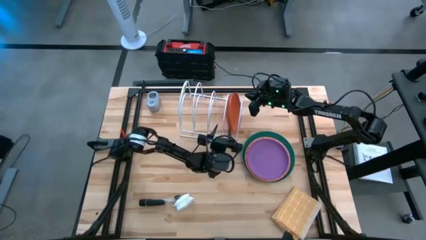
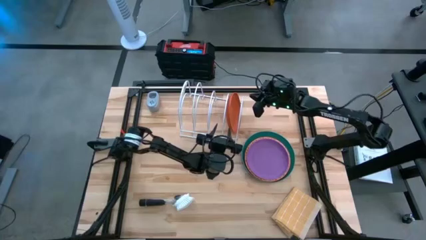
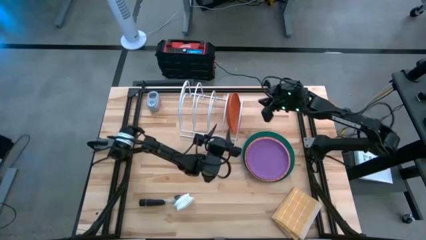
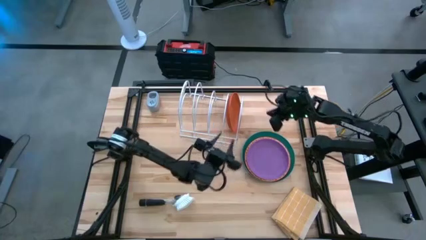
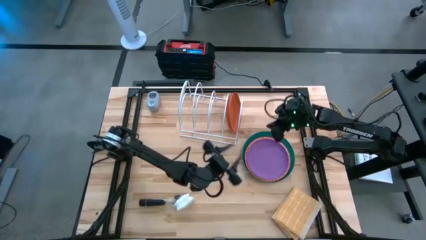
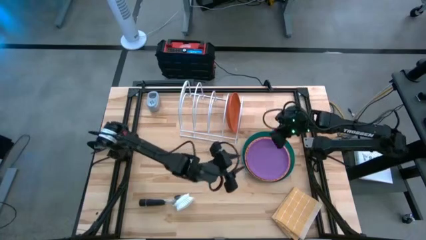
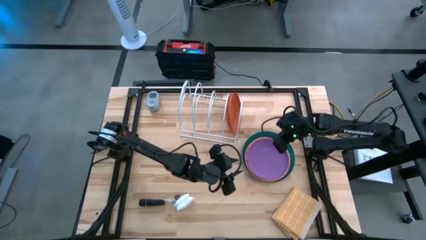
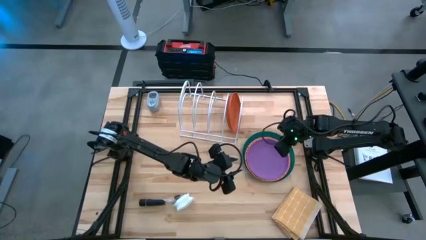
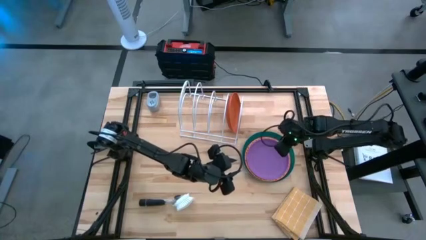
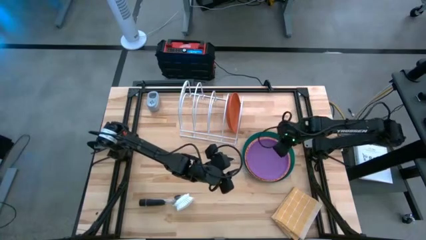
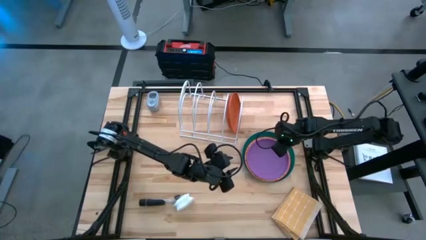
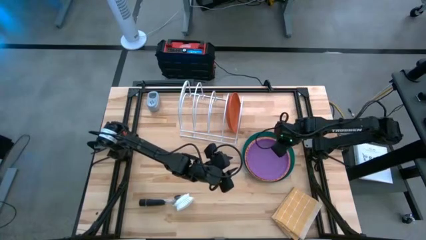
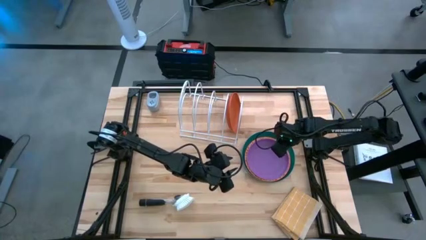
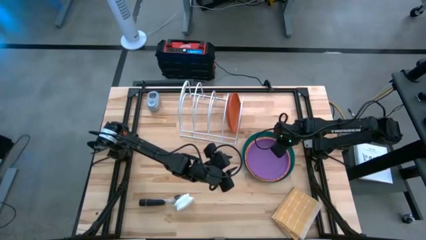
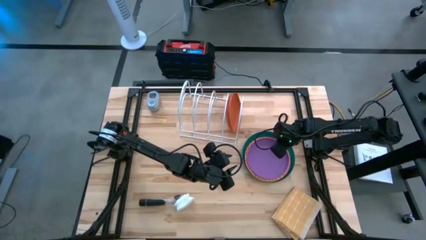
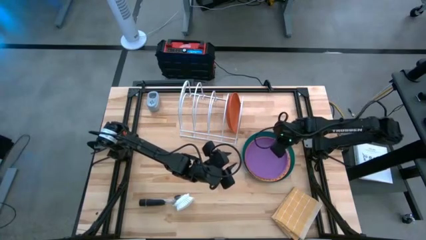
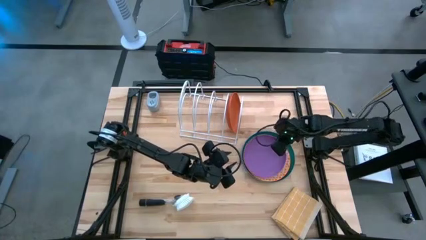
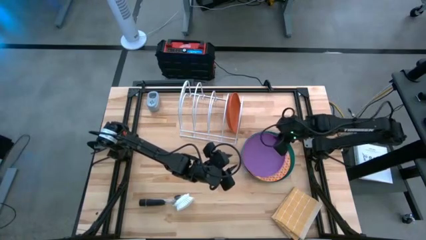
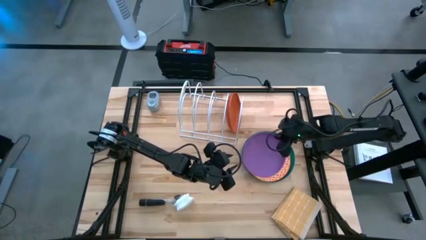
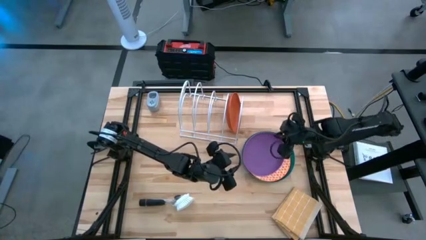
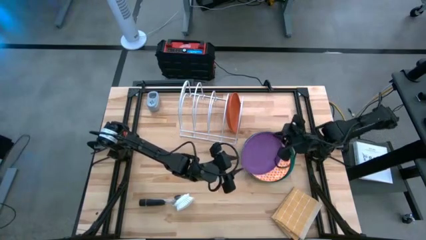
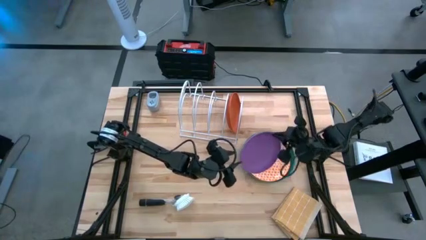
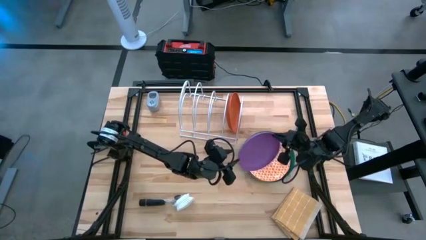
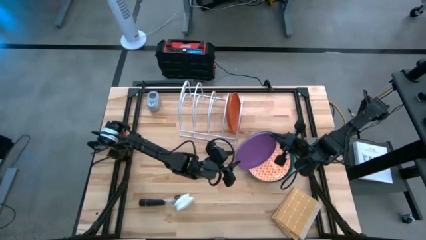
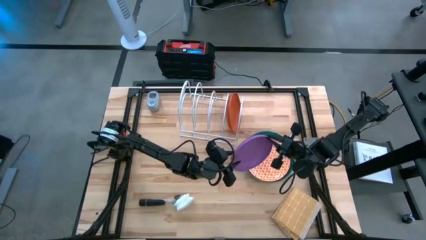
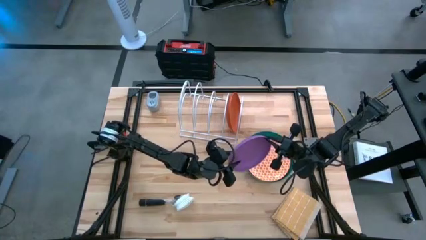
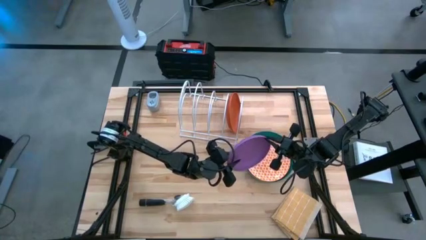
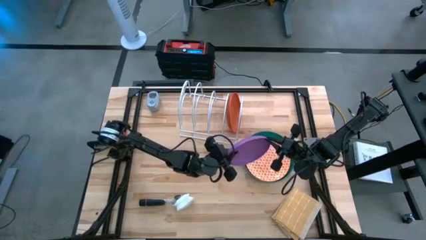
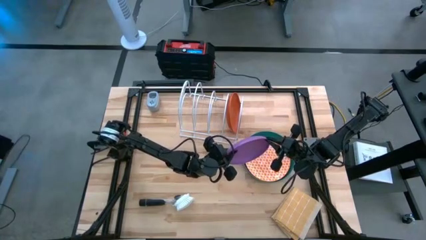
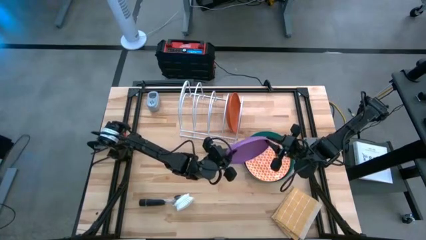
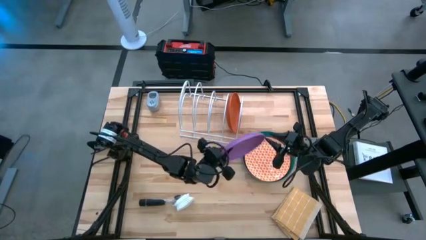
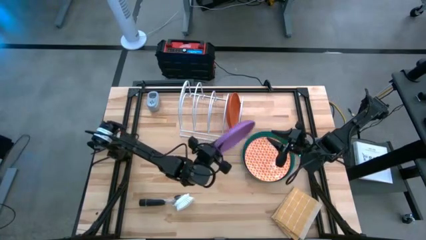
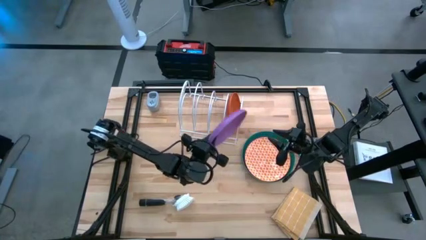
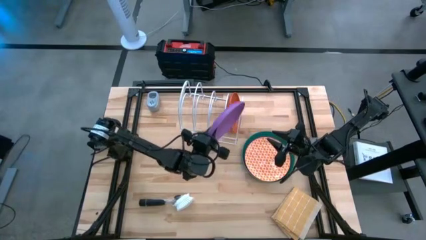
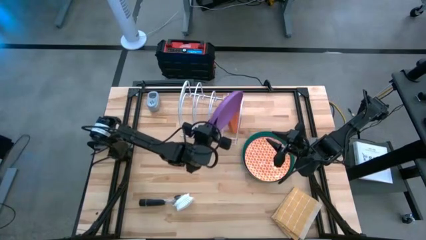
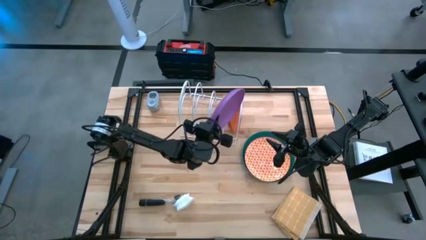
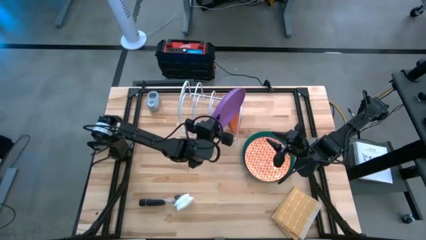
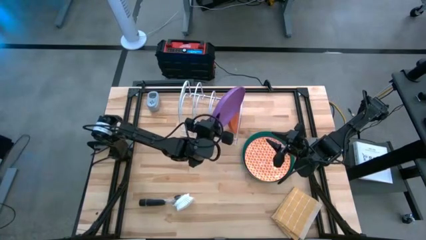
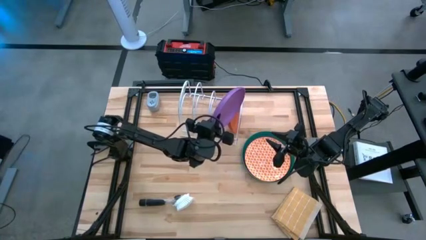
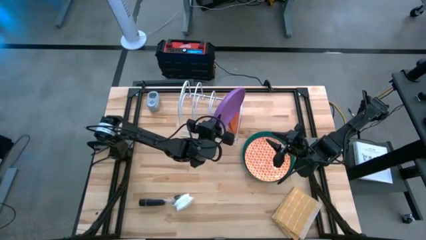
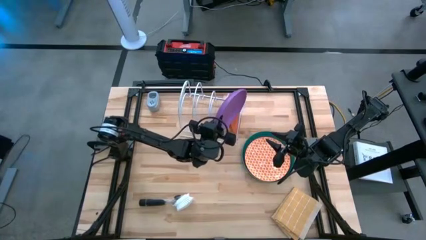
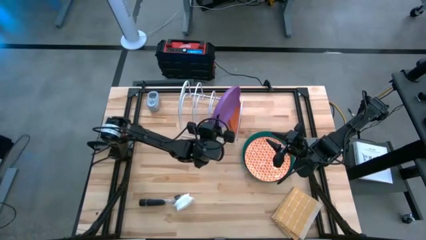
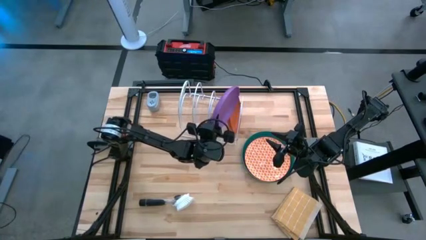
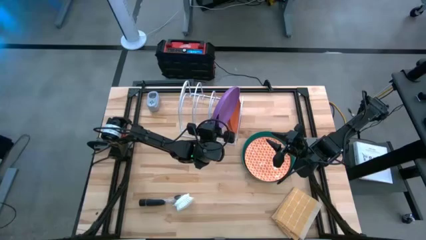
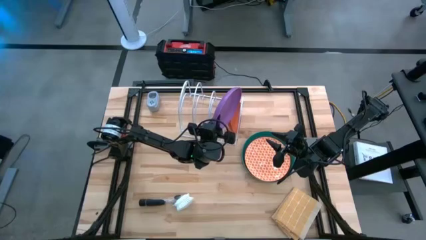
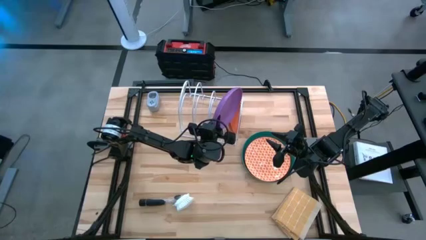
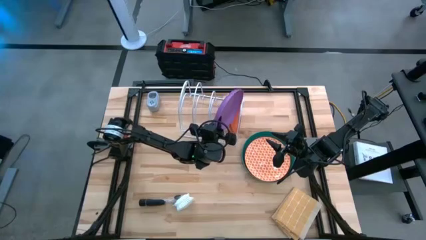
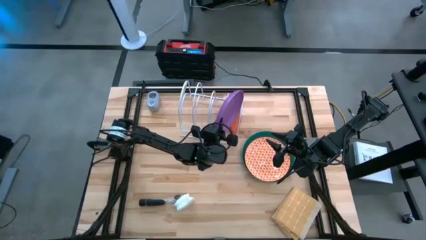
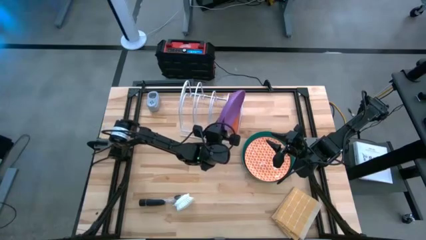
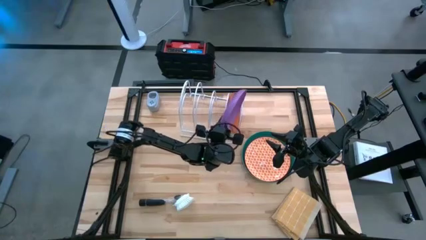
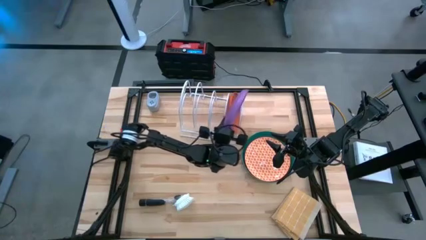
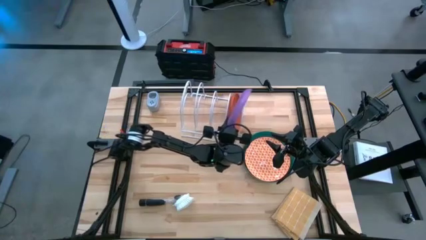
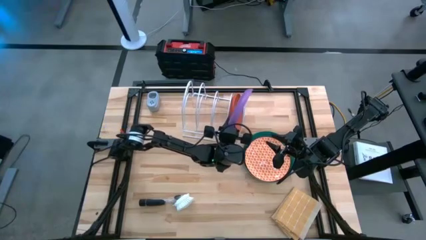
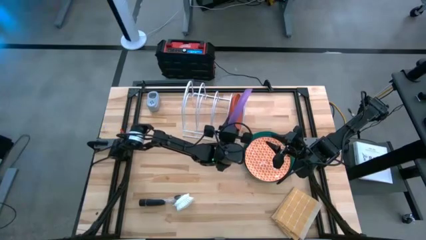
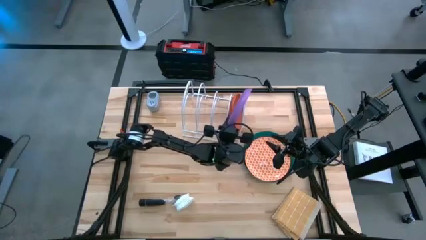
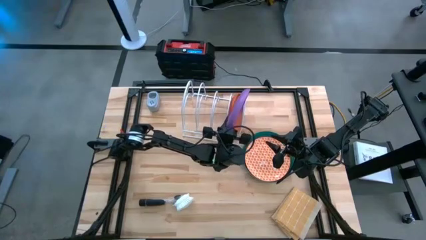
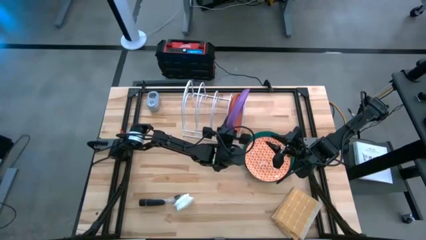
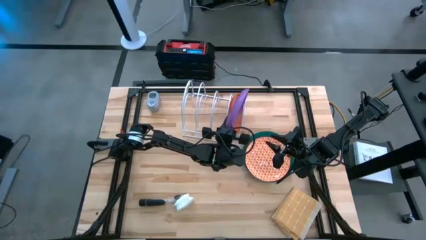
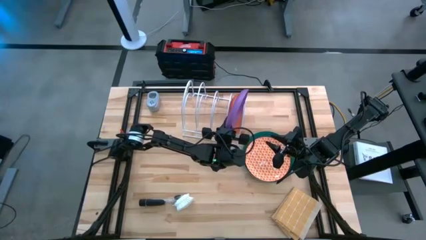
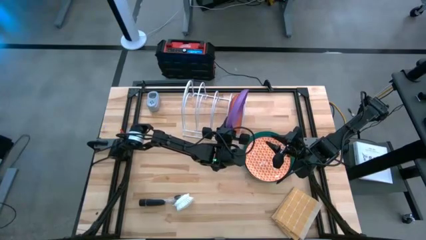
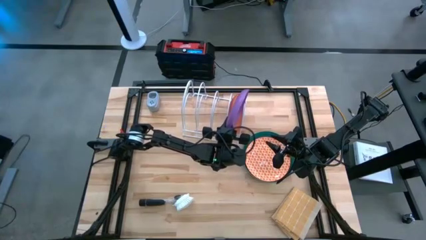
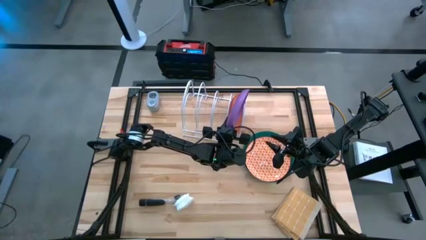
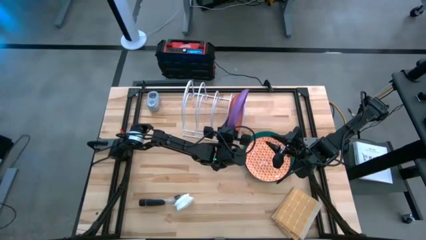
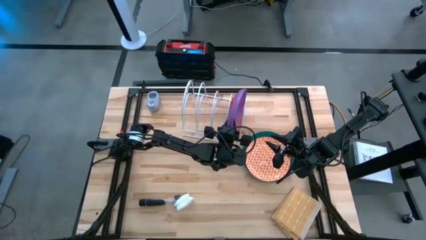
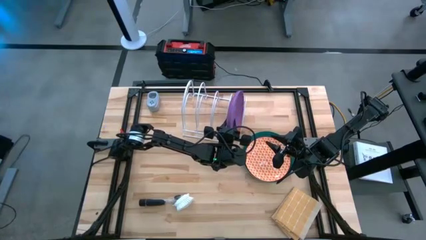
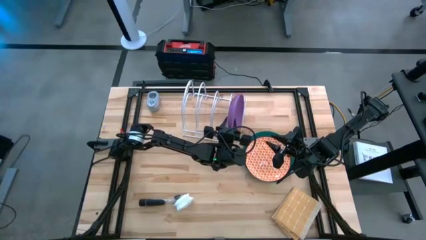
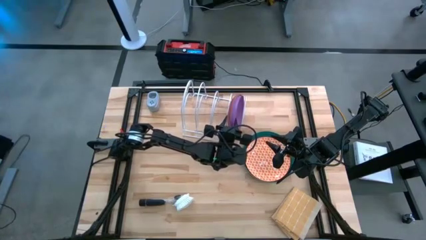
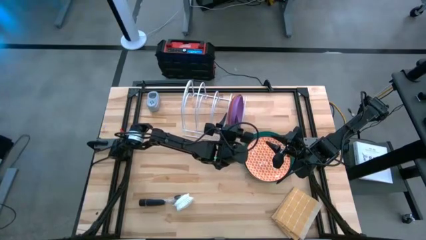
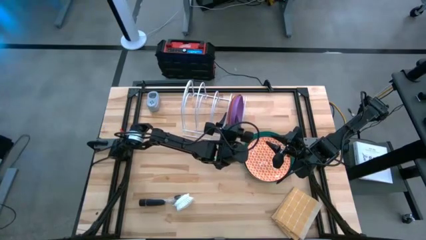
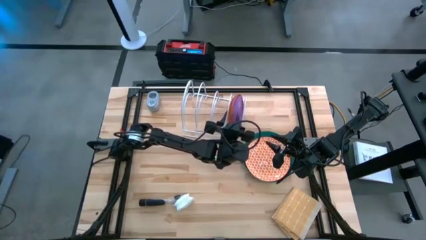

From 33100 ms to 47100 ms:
Task: Sort dishes
Put the purple plate into the dish rack
